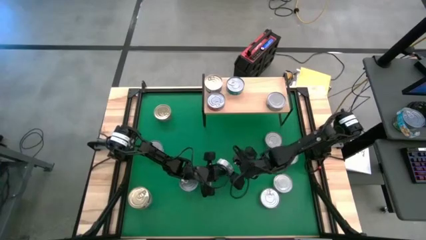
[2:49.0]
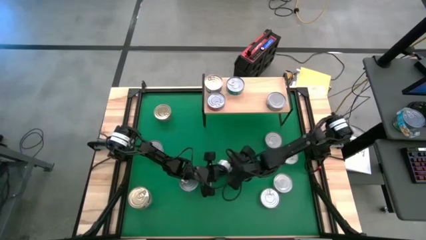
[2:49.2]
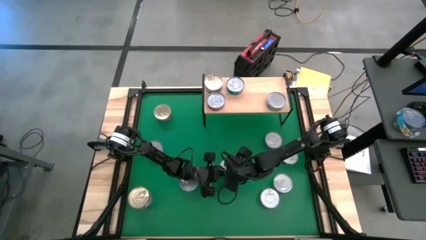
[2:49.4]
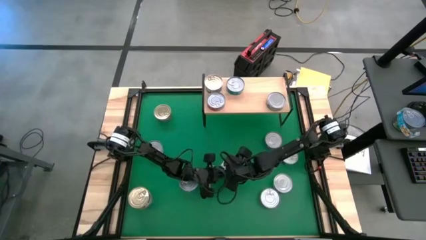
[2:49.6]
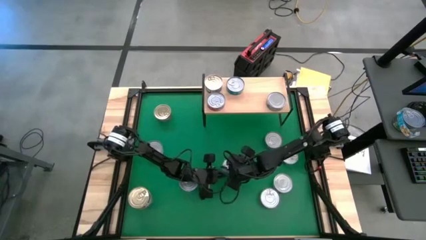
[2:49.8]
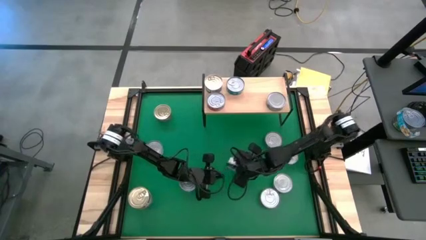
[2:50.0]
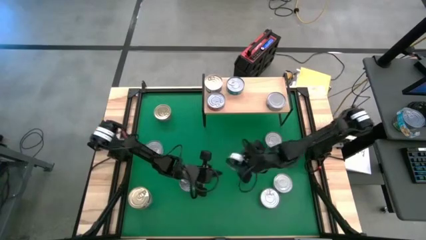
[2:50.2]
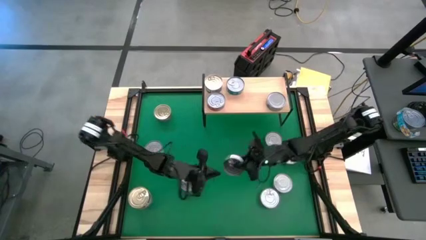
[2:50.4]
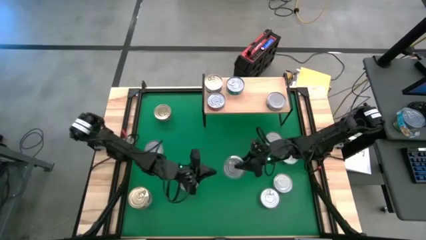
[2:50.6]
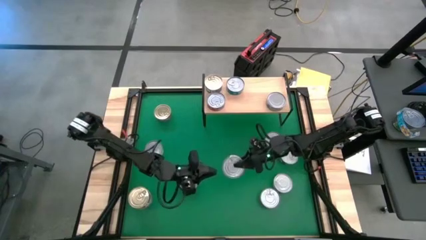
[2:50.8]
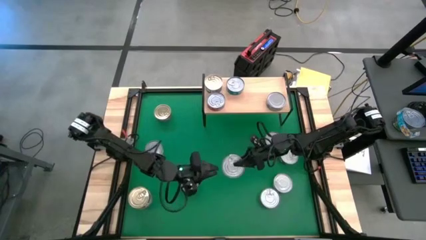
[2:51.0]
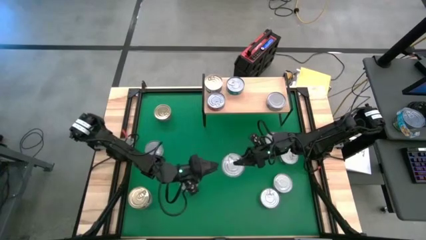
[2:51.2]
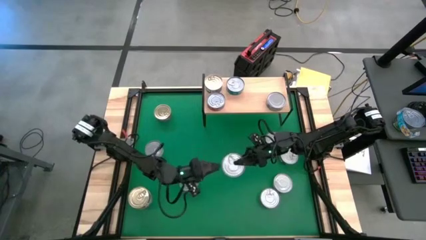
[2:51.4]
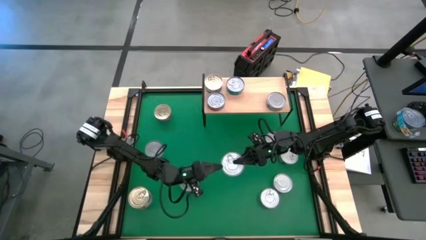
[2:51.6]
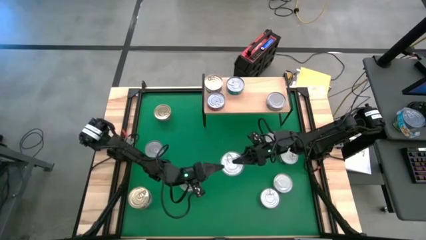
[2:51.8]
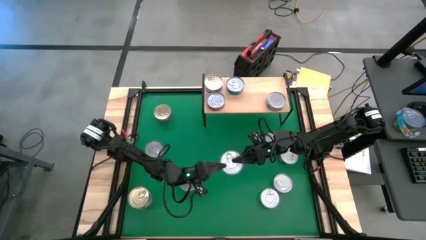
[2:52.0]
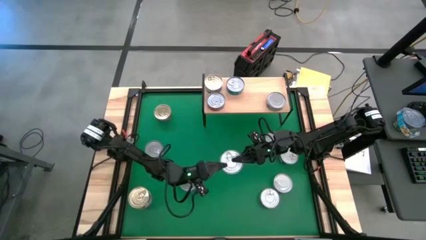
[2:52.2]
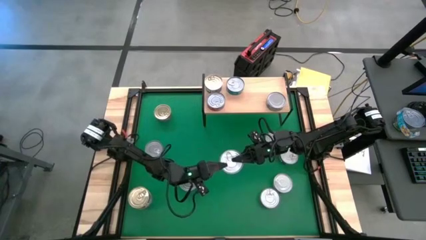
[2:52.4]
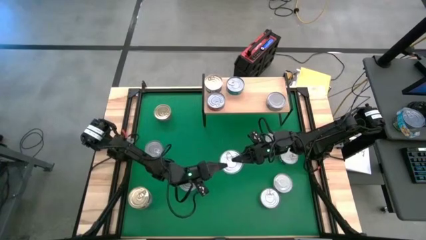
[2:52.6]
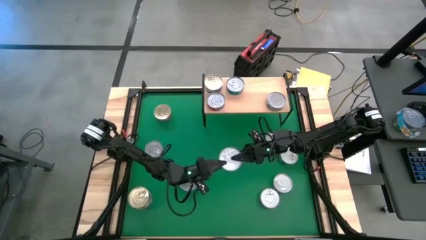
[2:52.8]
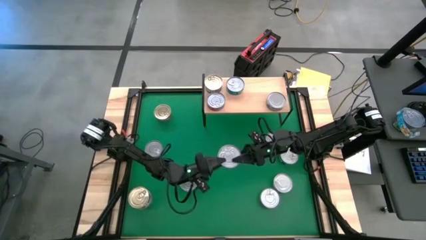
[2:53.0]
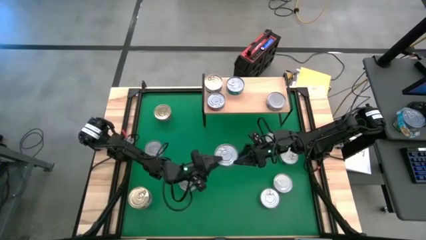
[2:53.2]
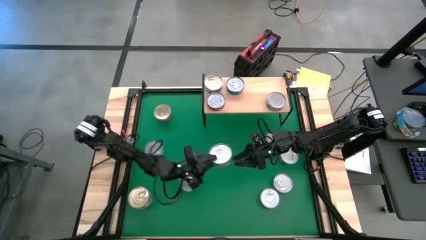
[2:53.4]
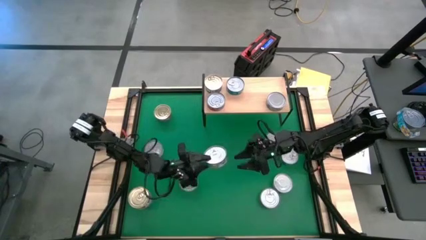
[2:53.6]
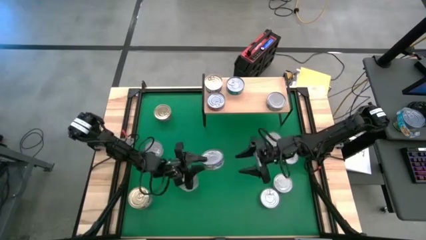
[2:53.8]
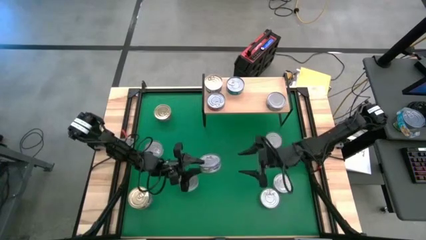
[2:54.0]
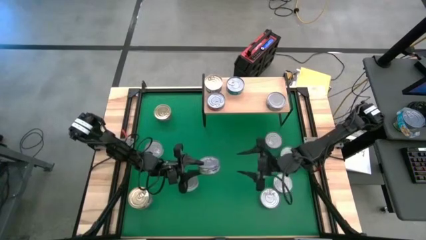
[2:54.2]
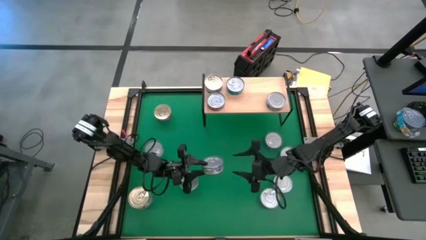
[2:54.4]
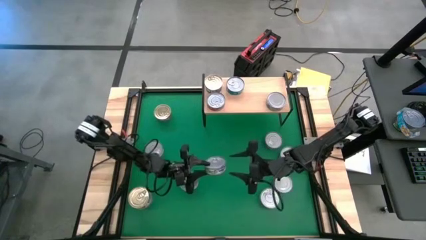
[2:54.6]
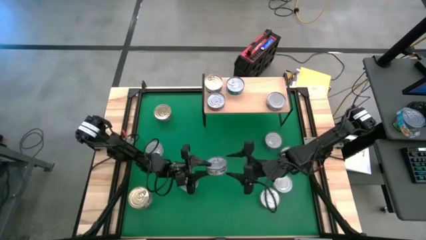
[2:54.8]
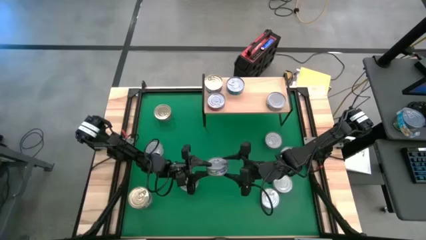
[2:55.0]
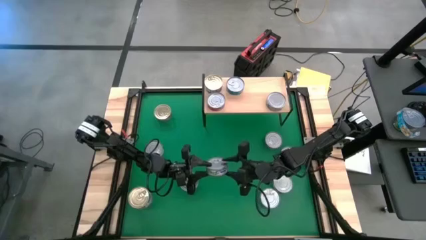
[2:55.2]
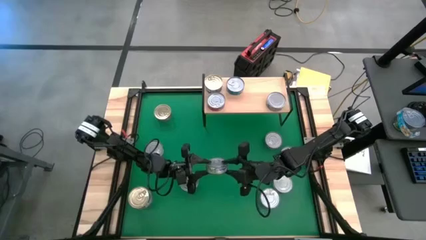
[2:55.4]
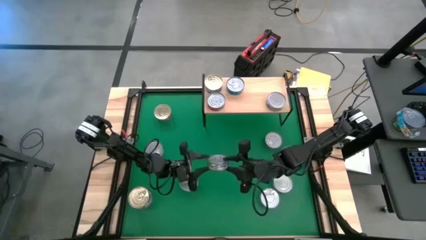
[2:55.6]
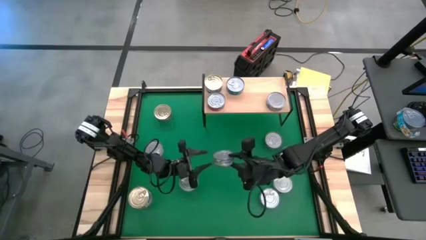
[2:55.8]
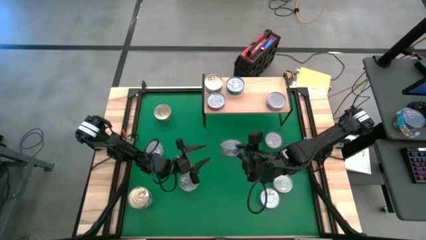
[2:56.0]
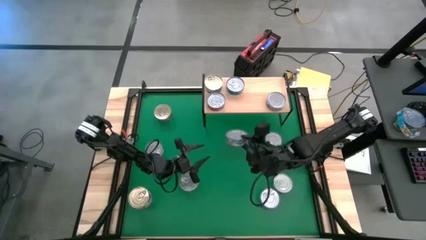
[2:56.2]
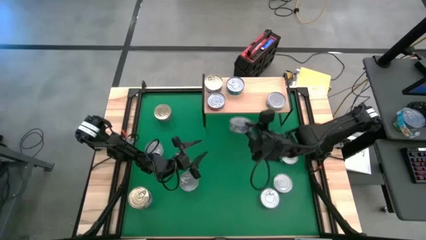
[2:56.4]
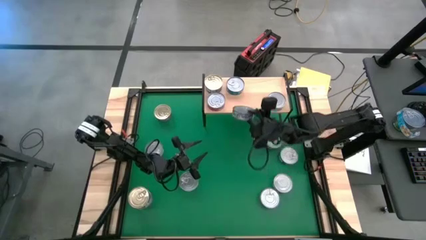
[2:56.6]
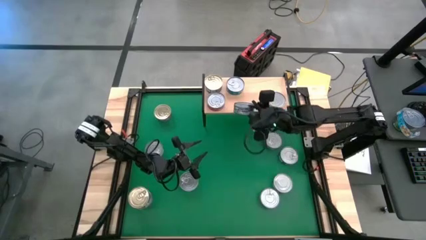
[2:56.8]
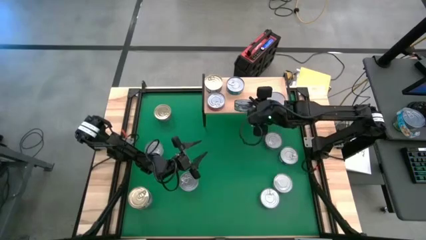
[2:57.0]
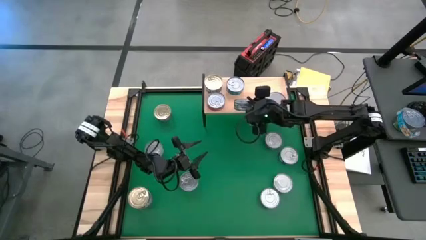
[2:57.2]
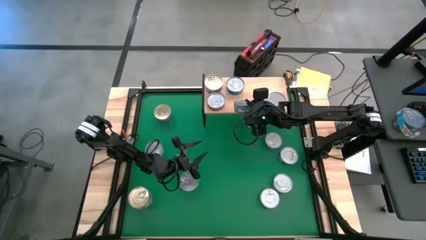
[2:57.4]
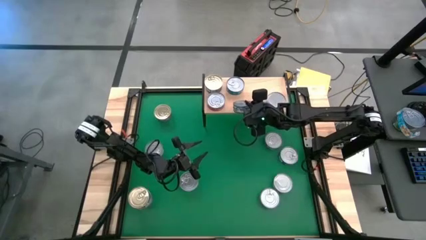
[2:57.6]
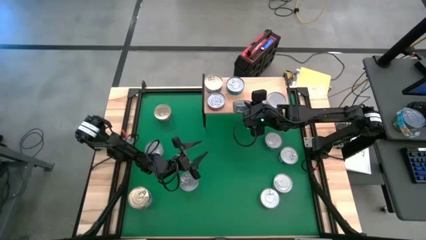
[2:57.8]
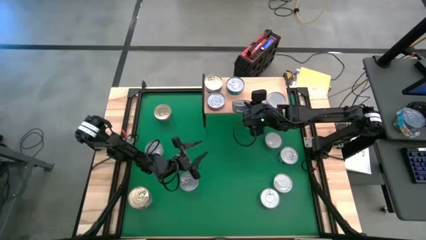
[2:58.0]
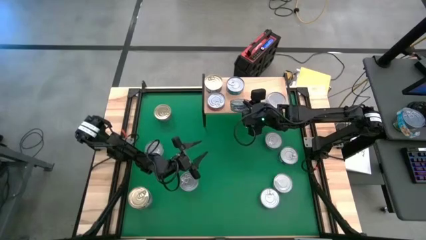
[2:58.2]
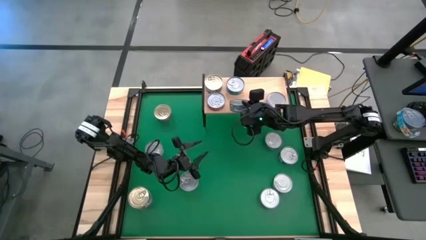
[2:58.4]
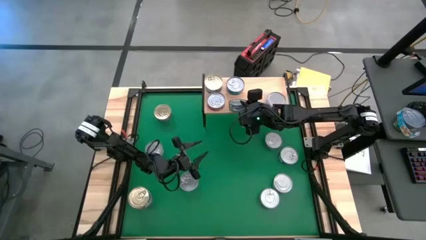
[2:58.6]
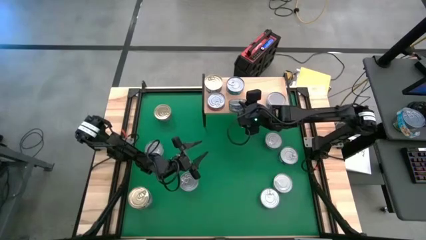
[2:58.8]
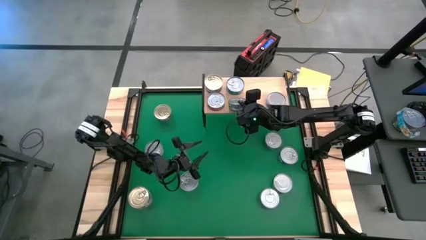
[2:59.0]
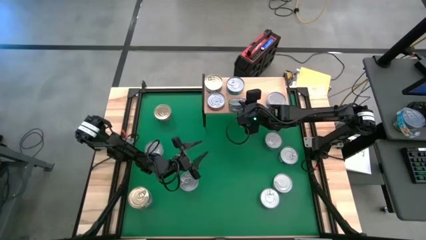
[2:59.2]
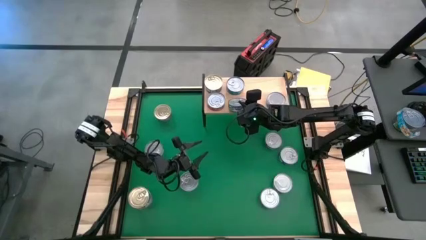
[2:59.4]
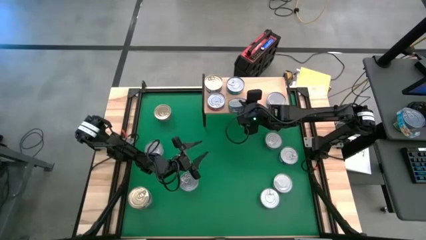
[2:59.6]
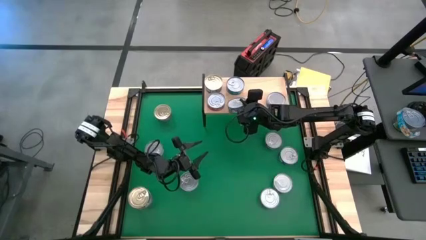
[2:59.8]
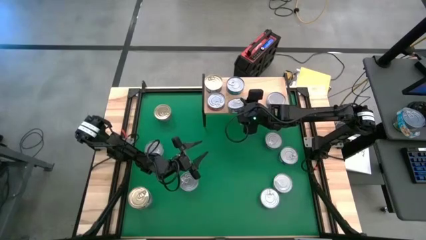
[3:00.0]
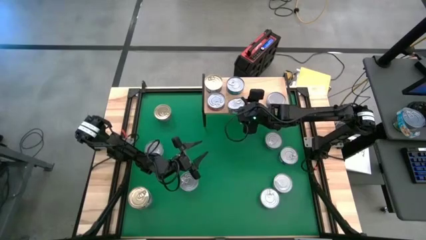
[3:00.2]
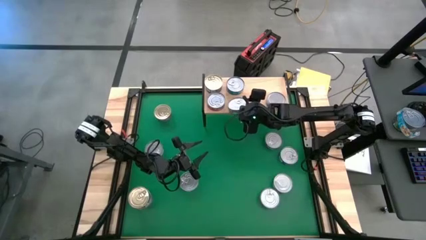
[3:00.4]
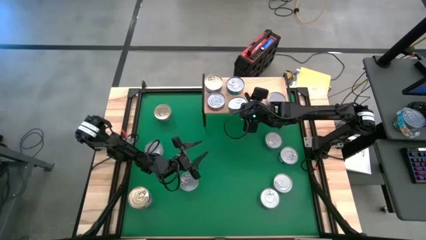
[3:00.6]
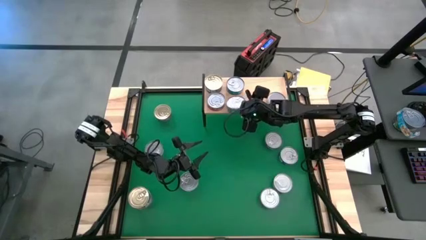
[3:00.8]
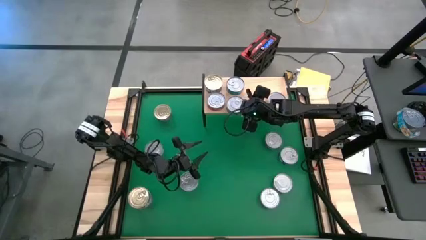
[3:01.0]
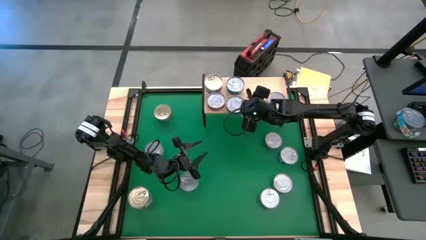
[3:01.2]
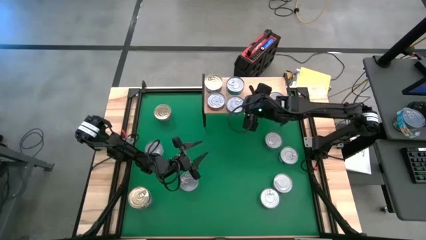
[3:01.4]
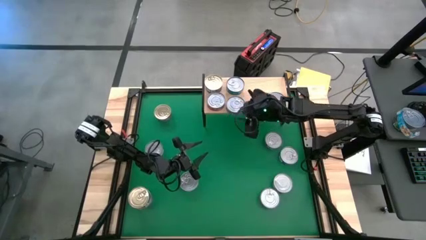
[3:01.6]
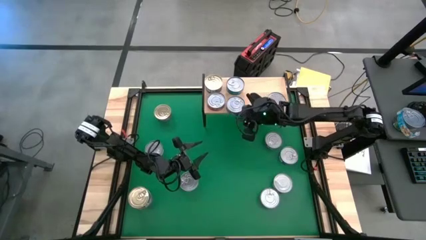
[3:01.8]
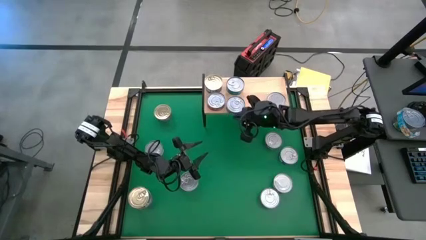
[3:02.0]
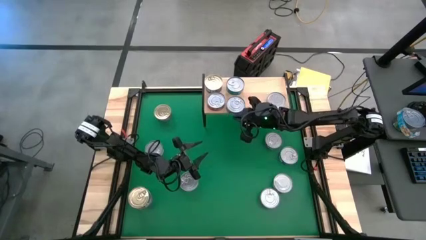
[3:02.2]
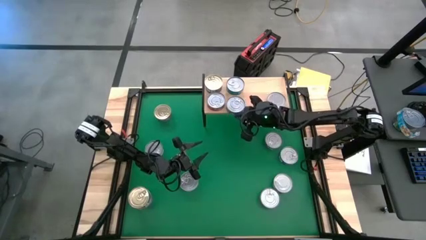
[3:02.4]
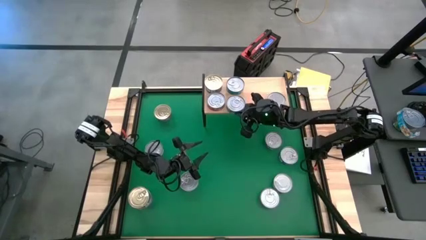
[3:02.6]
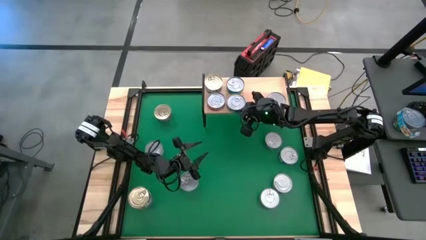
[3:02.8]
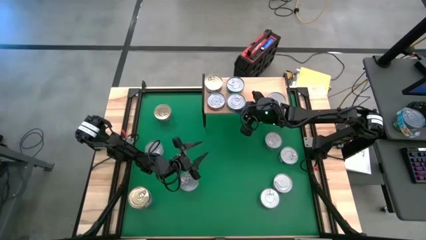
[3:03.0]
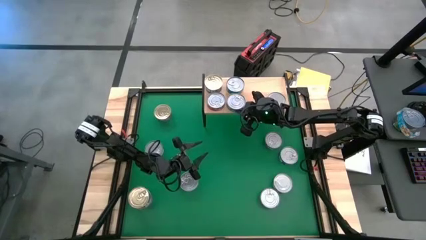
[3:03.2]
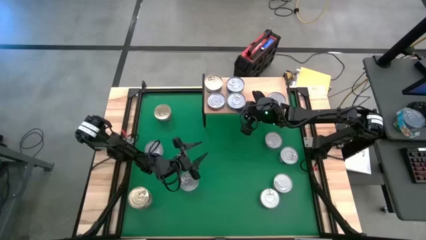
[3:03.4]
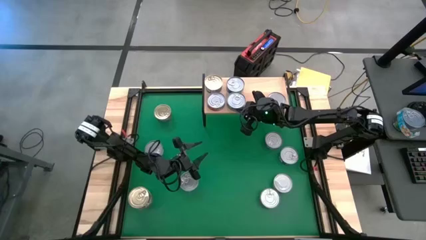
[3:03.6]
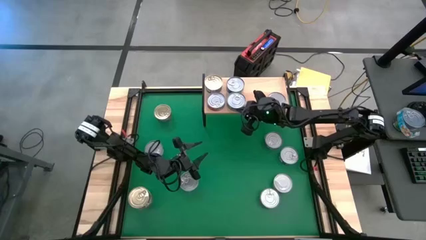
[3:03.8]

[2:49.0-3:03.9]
Task: Stack canned seafood by type on shelf
Put the green tuna can on the shelf
